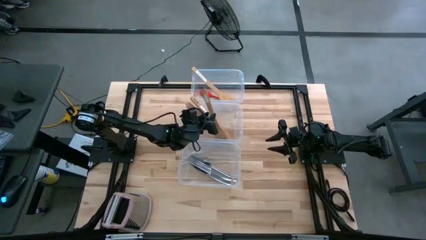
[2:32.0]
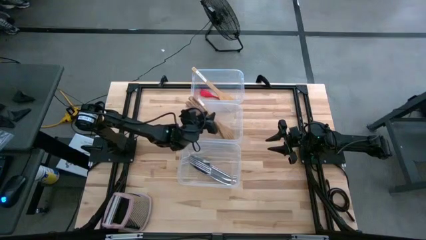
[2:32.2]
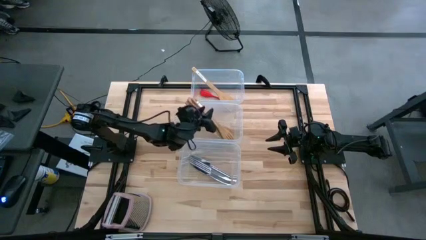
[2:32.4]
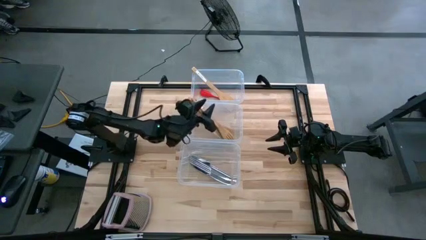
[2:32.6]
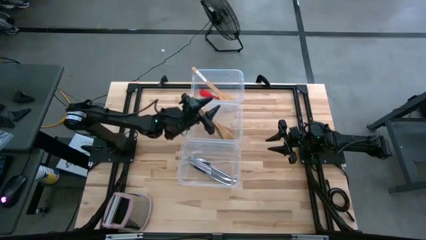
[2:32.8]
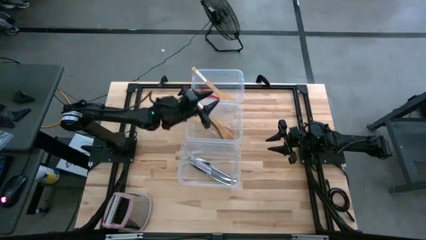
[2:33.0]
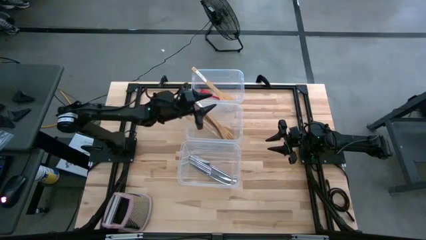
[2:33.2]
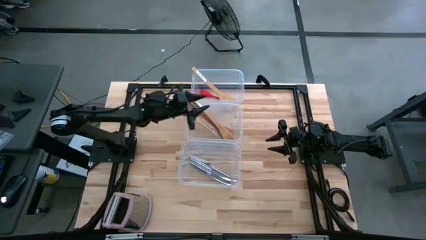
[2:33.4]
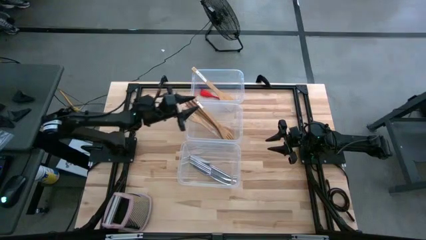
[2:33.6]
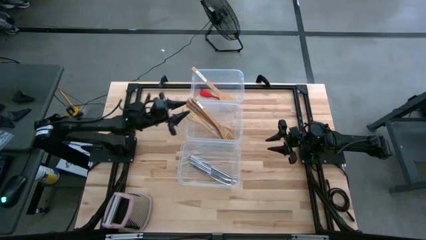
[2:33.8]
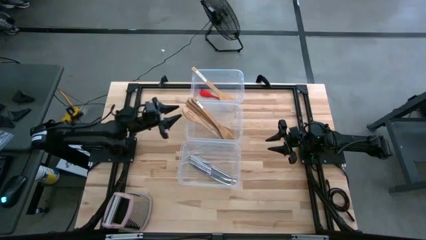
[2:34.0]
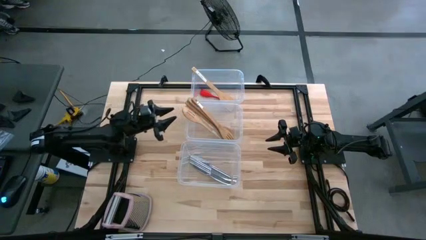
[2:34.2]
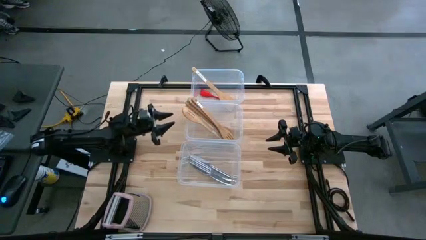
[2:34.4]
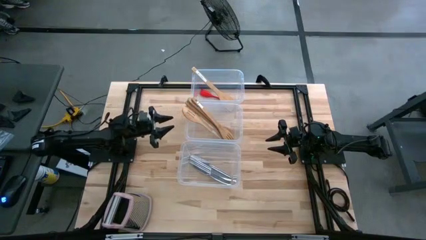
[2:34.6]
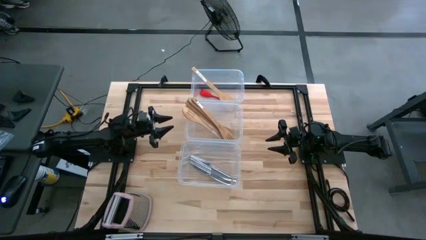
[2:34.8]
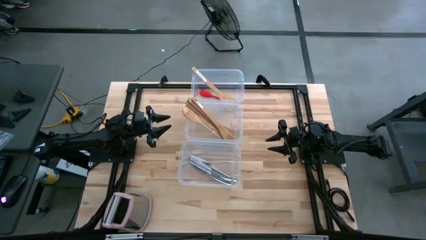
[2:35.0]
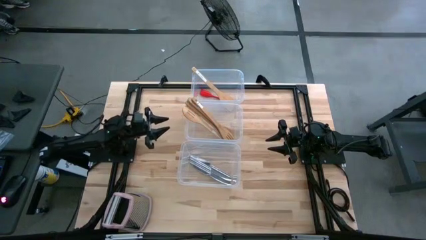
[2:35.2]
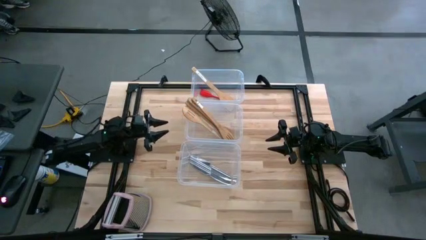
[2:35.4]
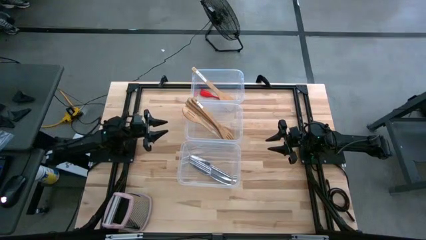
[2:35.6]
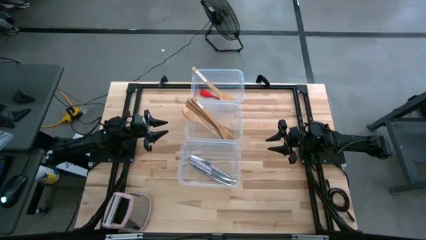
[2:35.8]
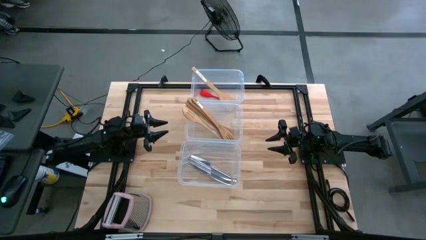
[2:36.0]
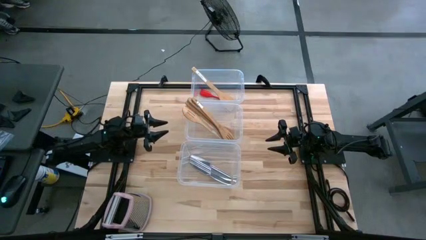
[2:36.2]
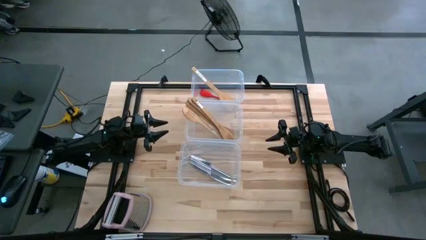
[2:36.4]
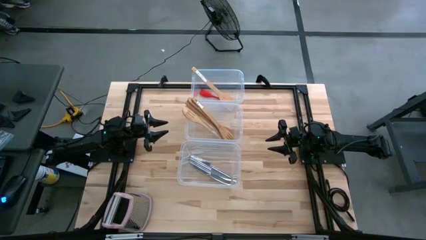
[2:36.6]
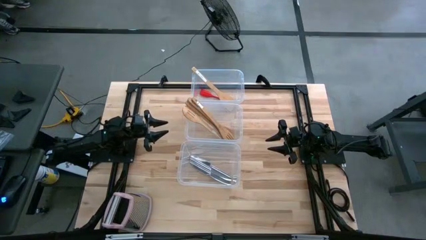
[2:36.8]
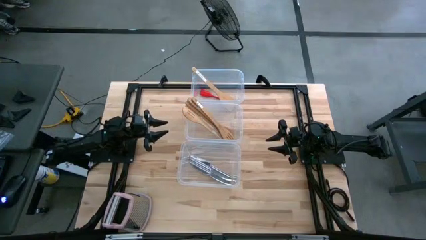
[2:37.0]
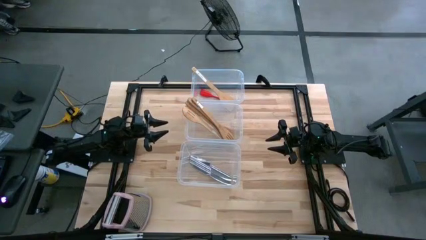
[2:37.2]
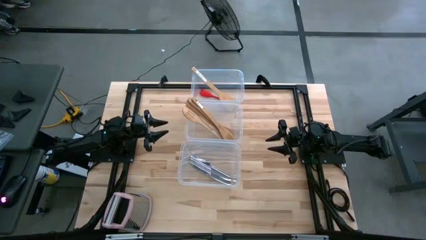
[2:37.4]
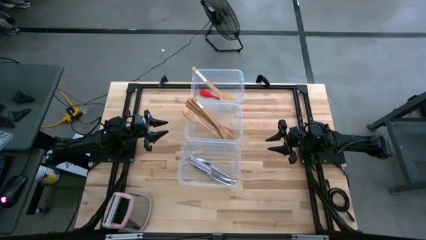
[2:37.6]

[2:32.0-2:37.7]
Task: Pick & Place Kitchen Items
Return to Home Position

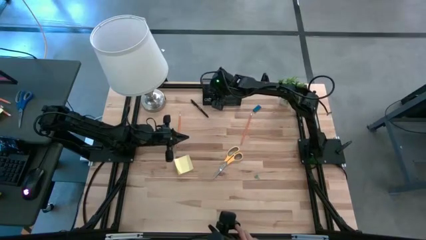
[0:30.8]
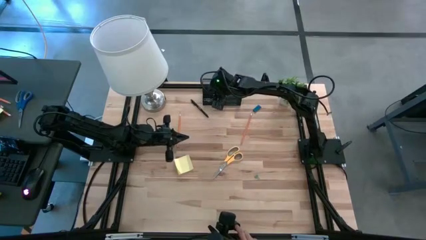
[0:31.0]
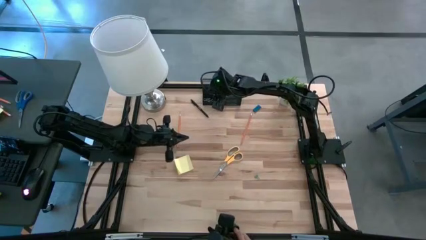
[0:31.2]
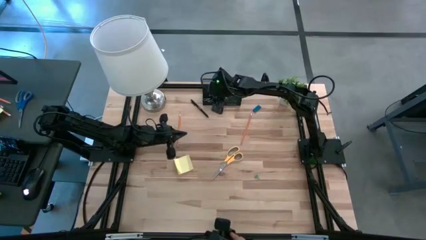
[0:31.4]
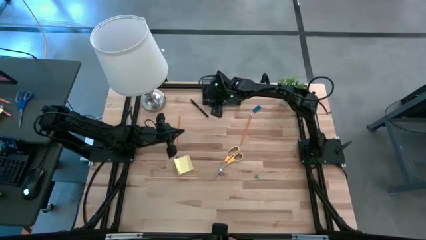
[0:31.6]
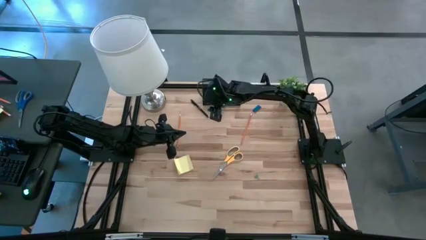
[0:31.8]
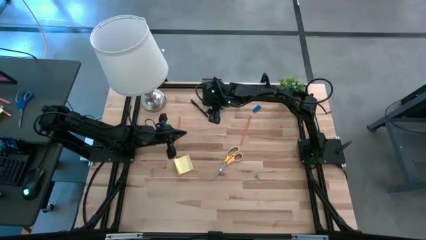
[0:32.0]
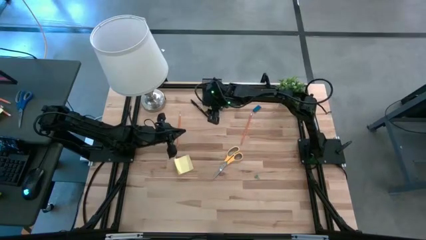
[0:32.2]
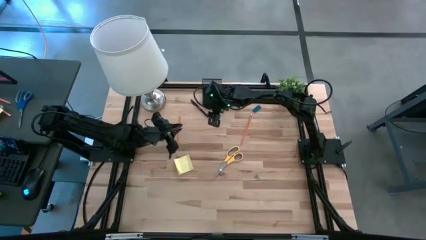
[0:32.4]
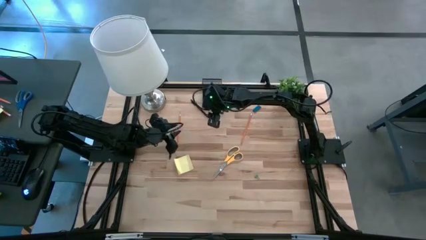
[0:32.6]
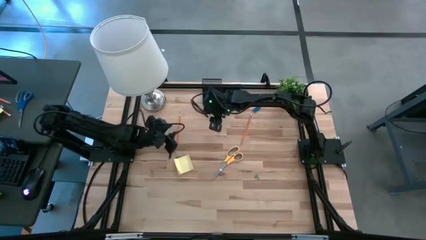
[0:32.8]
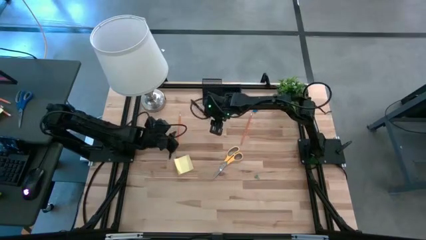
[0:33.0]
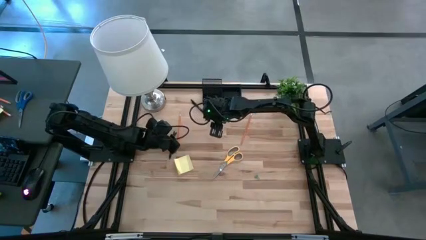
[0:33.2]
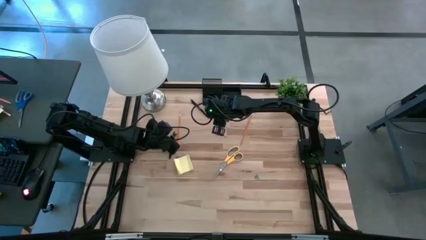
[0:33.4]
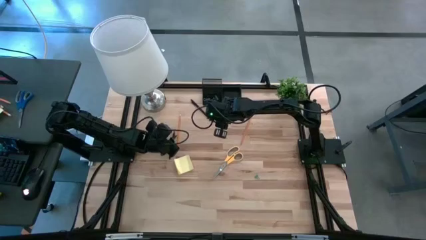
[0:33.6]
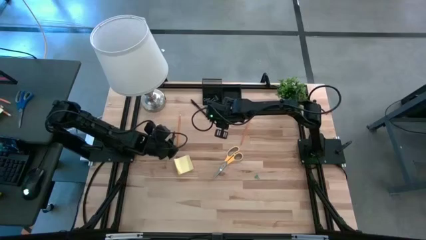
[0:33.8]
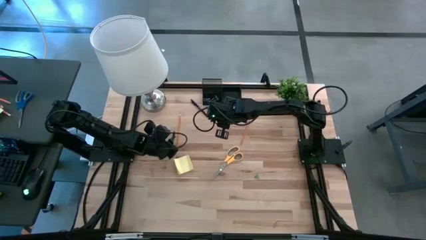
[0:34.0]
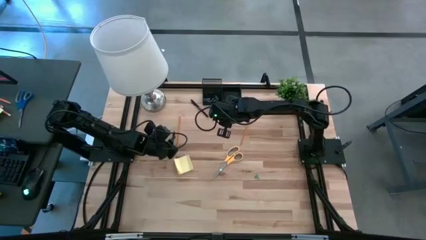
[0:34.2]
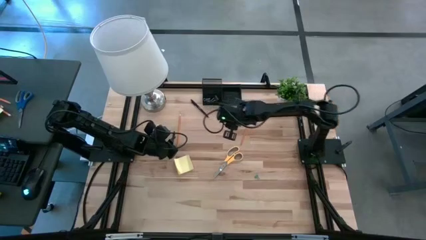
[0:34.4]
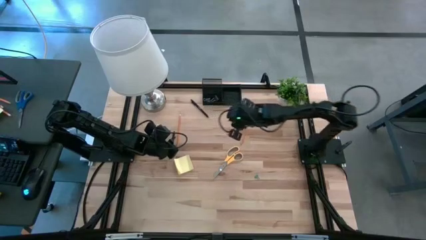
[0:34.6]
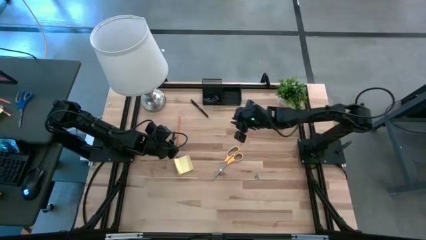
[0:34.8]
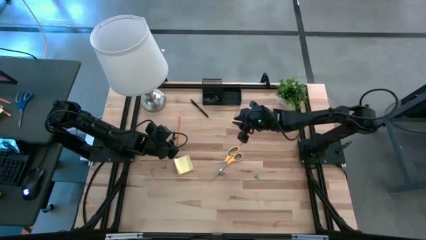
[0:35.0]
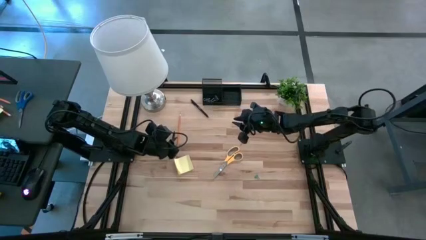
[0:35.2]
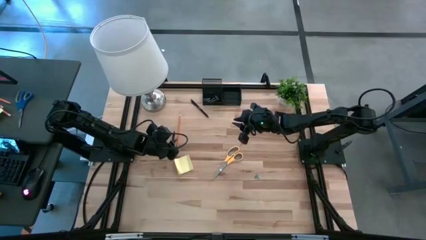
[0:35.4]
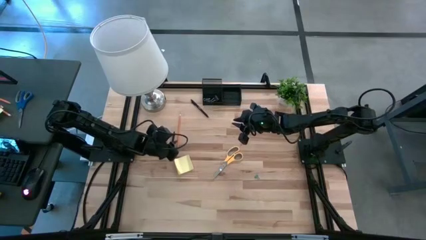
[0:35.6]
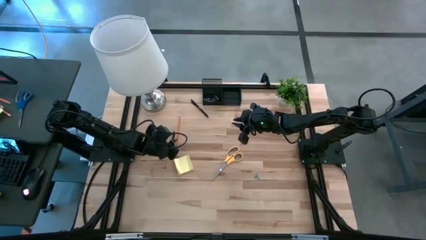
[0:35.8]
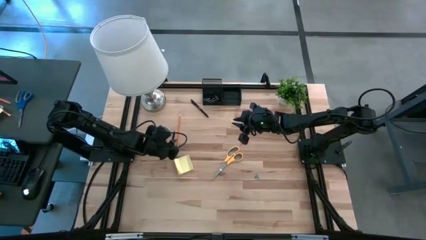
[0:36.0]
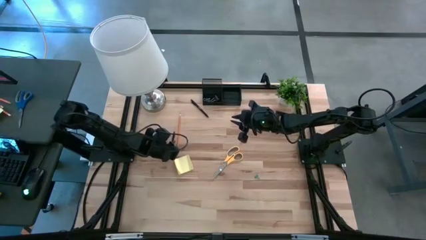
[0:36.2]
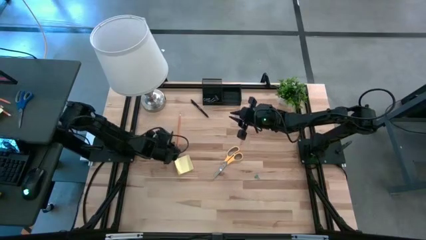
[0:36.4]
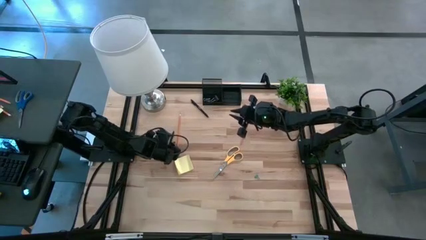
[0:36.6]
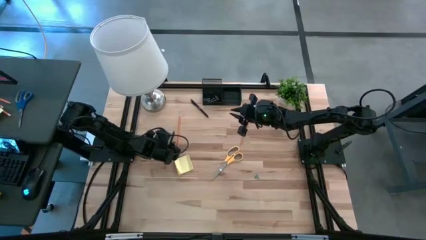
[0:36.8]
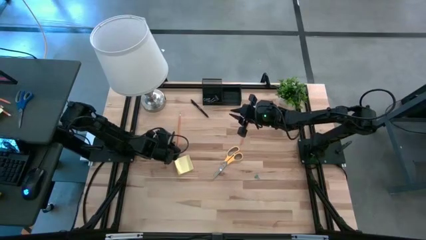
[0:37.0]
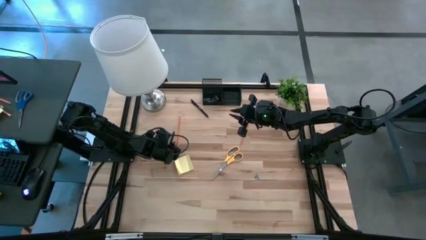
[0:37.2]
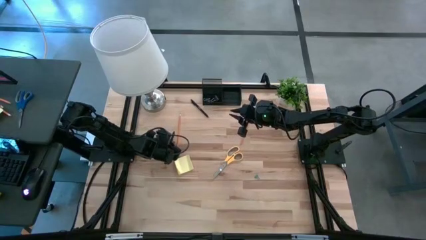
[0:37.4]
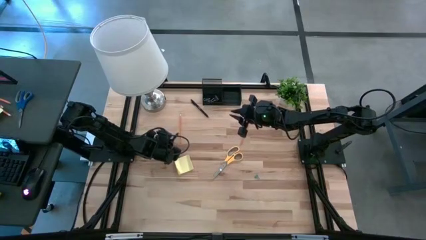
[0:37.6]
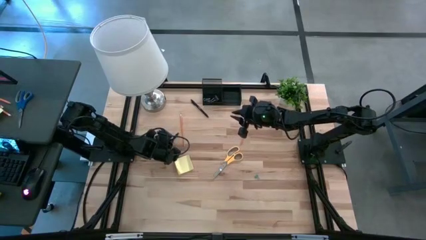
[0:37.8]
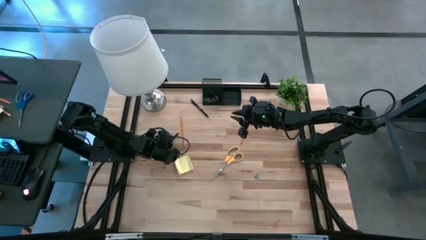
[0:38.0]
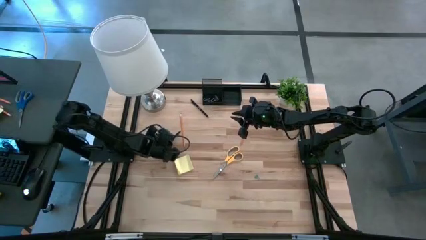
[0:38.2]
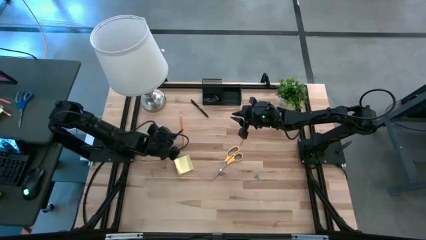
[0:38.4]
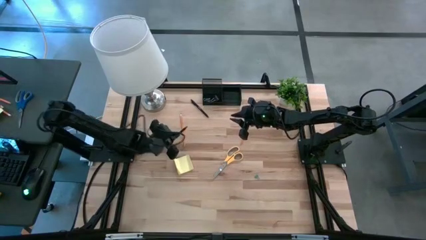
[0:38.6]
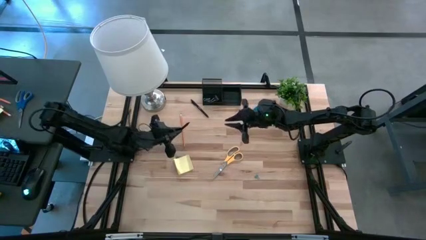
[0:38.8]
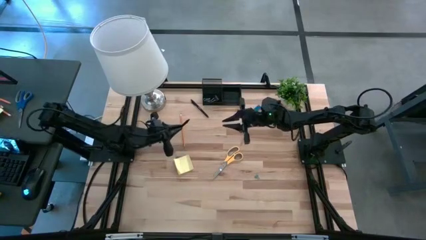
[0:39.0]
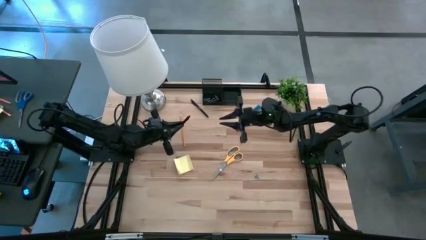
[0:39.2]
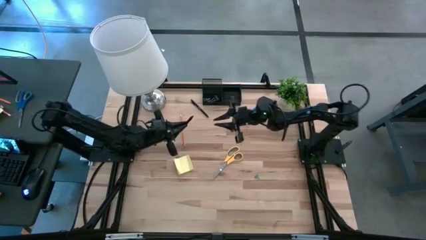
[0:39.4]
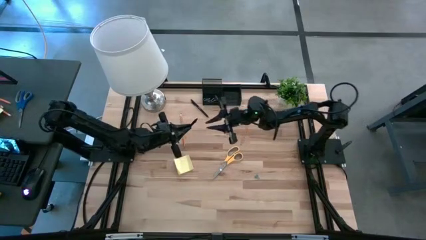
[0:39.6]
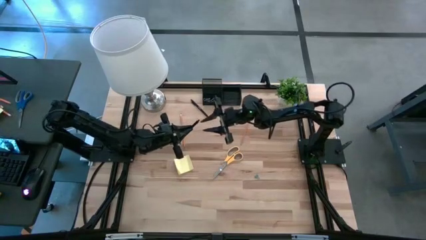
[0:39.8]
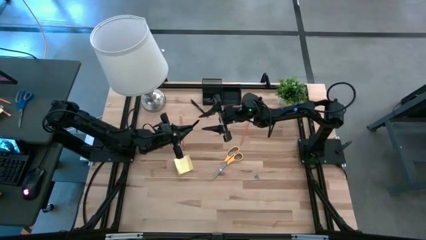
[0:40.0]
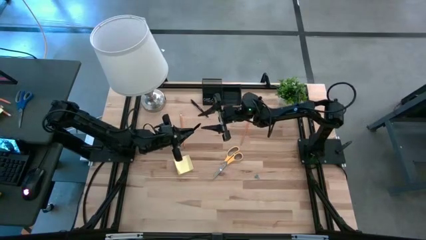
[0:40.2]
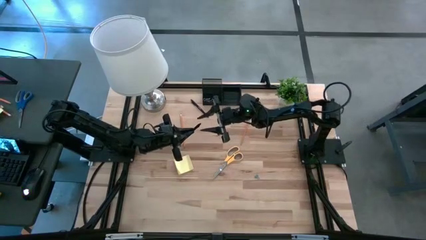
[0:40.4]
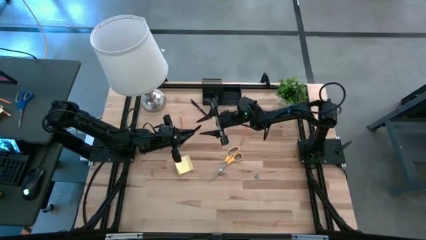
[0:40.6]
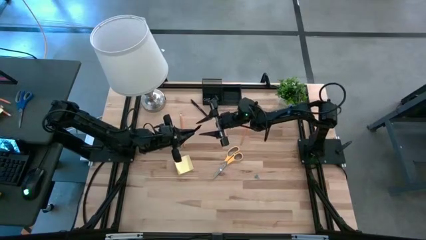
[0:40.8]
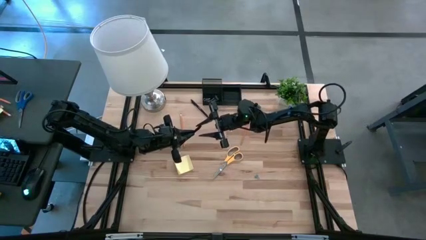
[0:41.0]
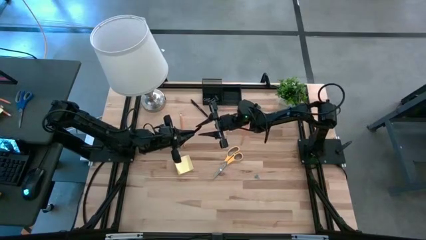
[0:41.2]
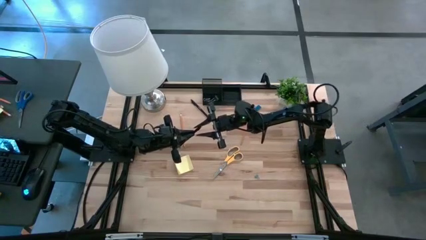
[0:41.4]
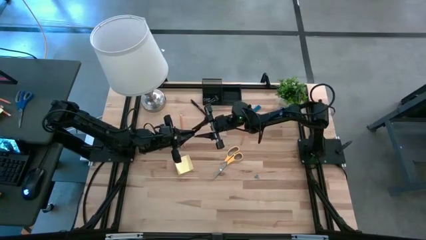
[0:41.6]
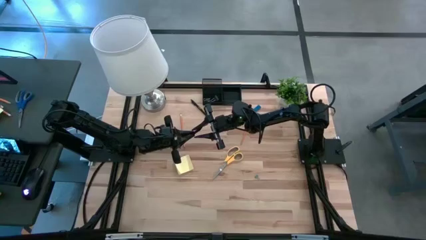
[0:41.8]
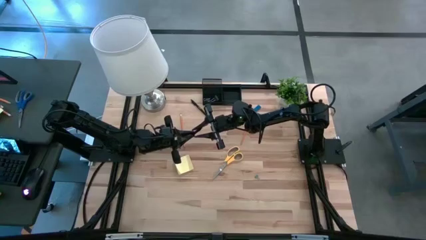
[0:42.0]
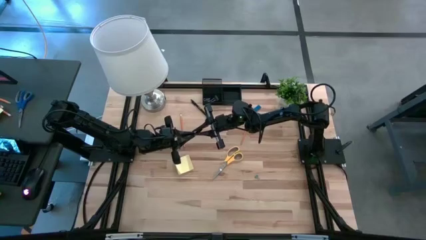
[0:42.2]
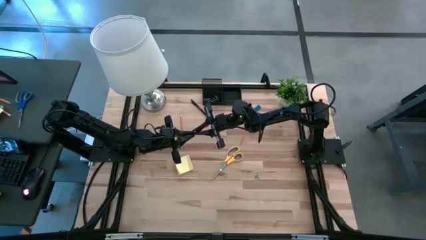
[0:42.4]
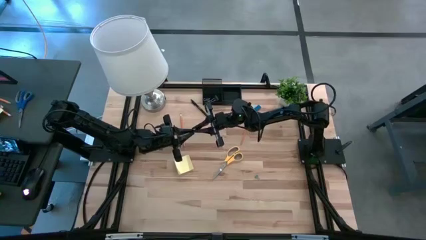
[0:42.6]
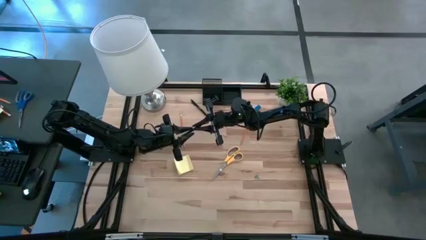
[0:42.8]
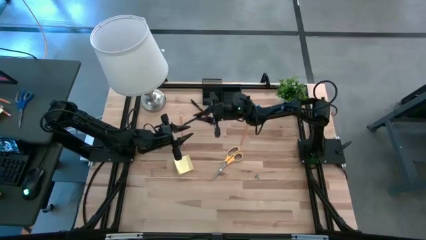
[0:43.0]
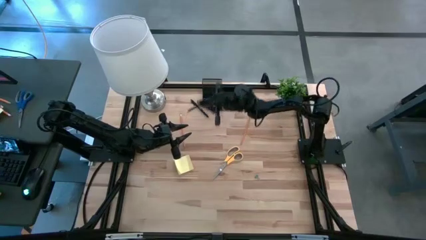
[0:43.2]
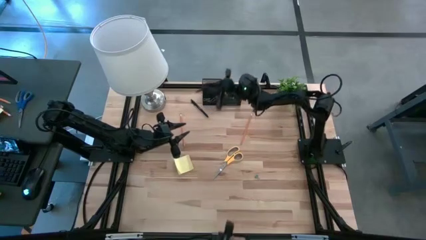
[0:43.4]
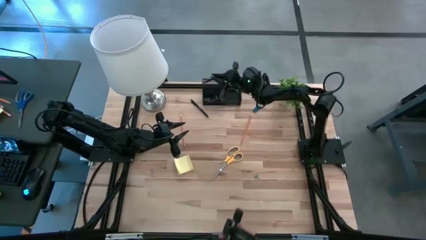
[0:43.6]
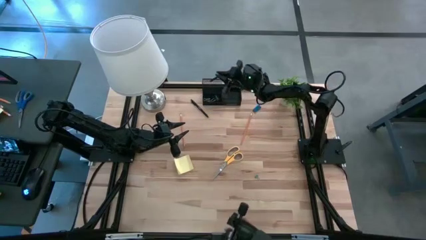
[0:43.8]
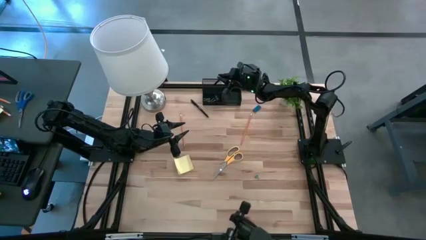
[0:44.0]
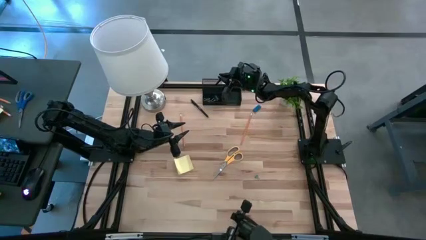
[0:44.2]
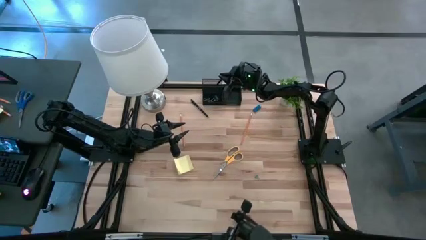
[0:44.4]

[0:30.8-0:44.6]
Task: Pick and place office supplies into organizer
Put the bottom pen into the desk organizer
